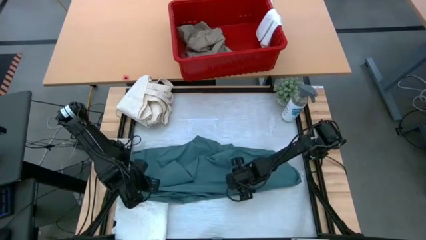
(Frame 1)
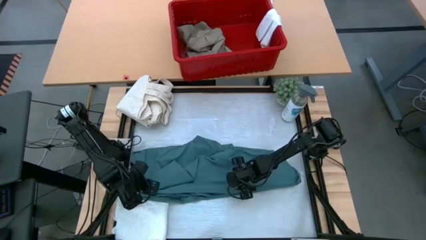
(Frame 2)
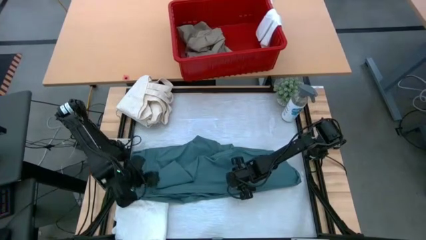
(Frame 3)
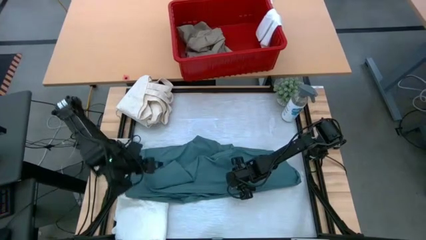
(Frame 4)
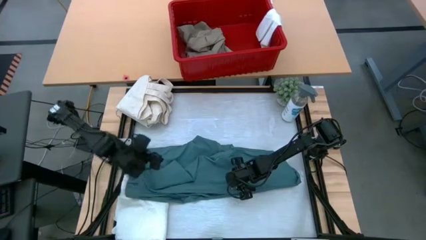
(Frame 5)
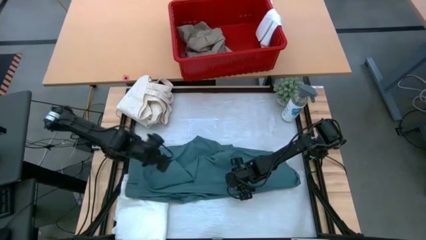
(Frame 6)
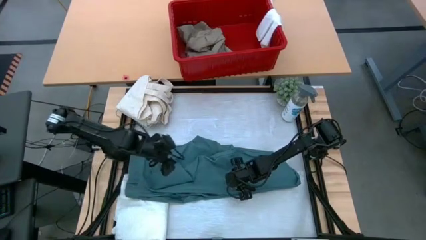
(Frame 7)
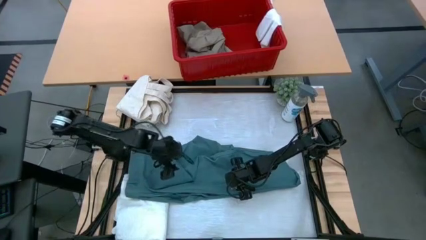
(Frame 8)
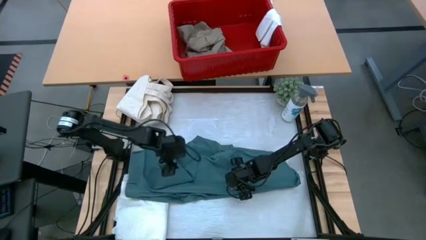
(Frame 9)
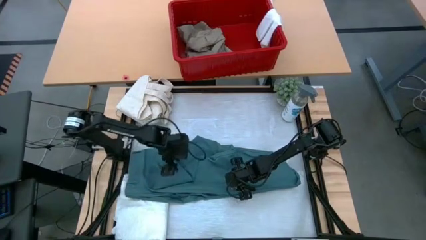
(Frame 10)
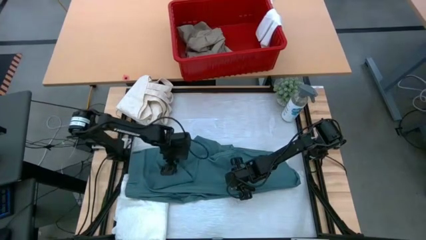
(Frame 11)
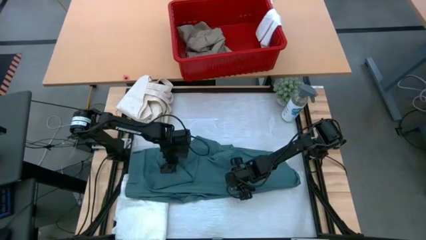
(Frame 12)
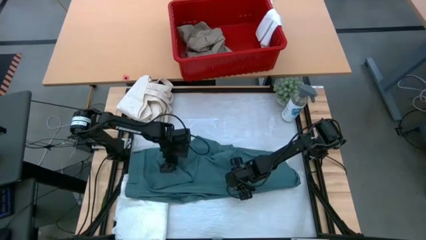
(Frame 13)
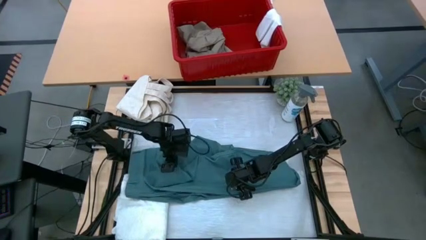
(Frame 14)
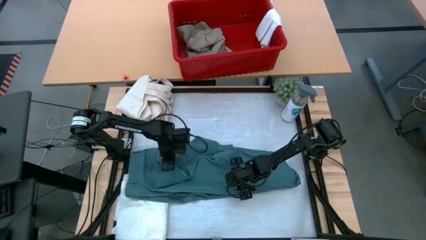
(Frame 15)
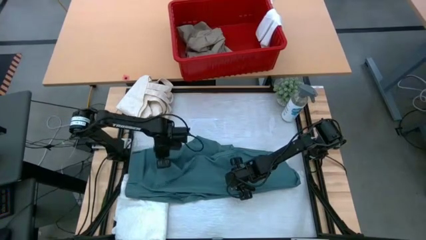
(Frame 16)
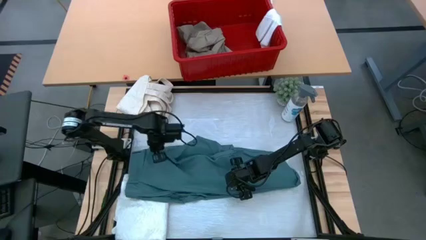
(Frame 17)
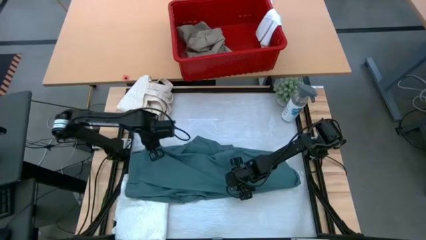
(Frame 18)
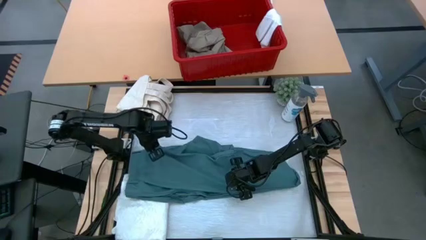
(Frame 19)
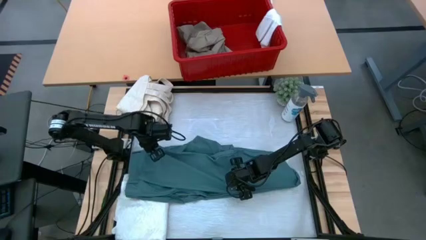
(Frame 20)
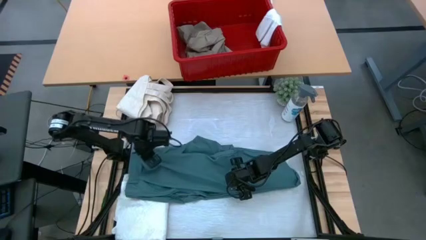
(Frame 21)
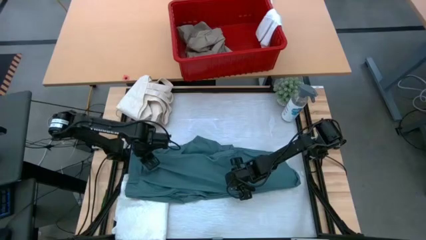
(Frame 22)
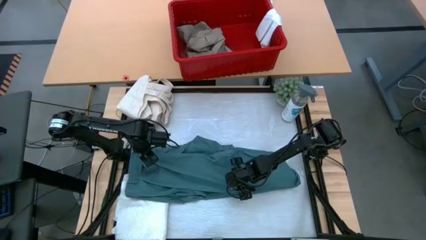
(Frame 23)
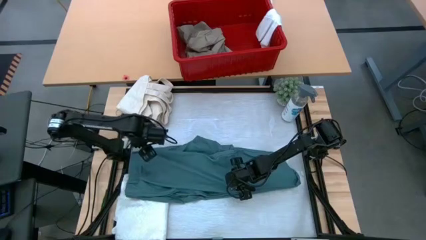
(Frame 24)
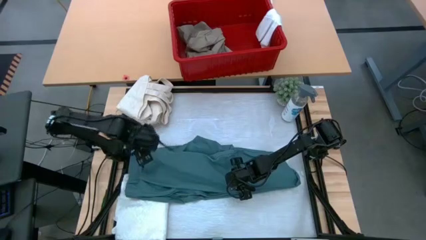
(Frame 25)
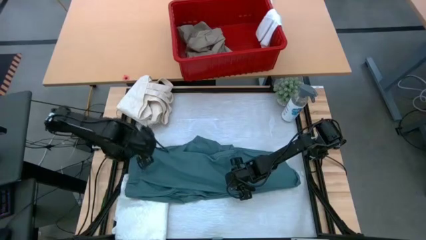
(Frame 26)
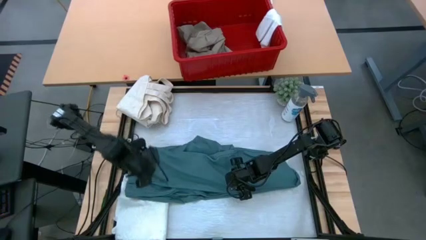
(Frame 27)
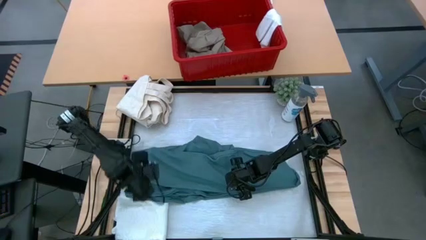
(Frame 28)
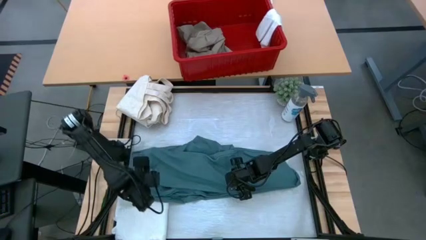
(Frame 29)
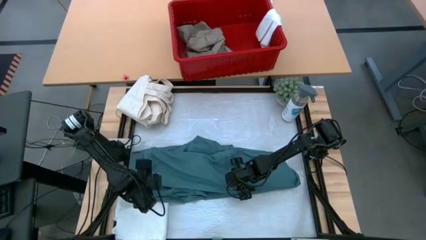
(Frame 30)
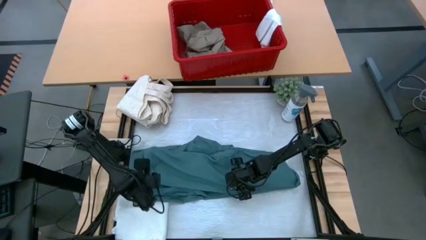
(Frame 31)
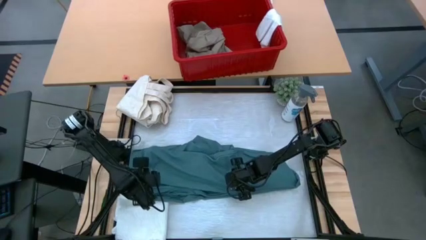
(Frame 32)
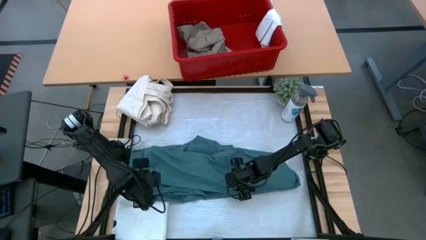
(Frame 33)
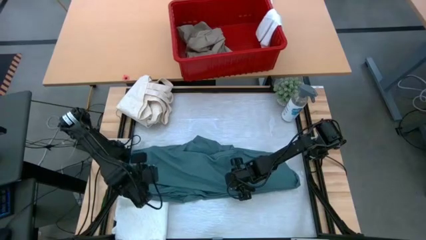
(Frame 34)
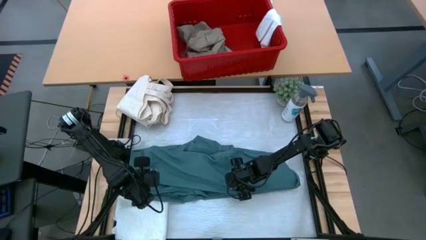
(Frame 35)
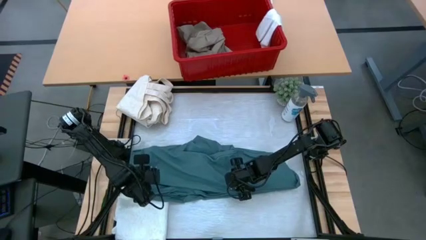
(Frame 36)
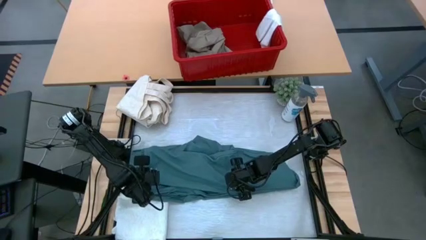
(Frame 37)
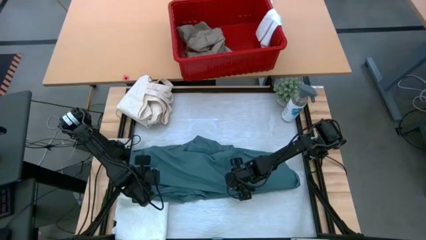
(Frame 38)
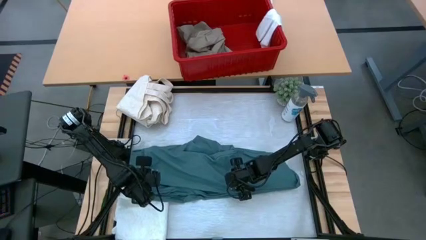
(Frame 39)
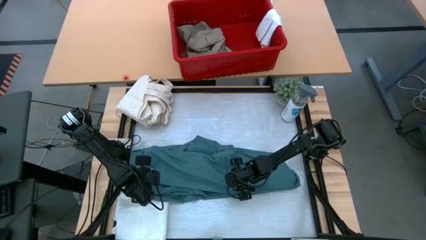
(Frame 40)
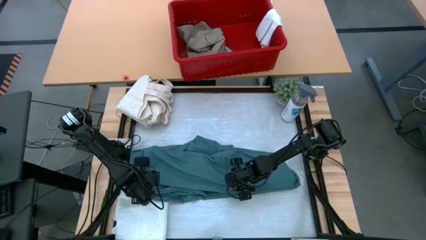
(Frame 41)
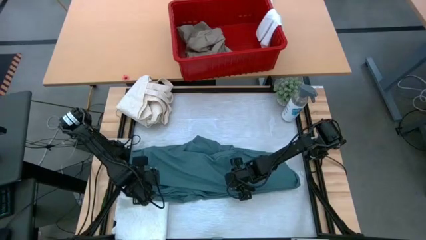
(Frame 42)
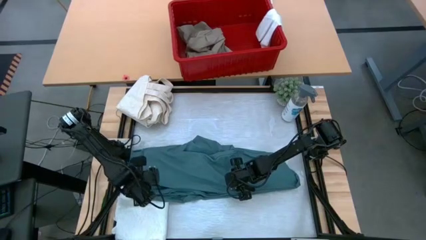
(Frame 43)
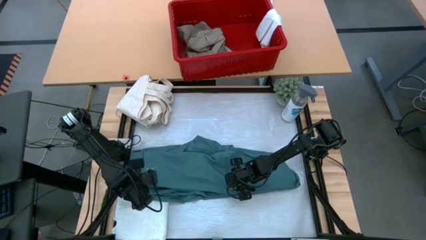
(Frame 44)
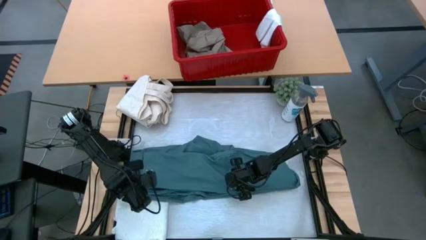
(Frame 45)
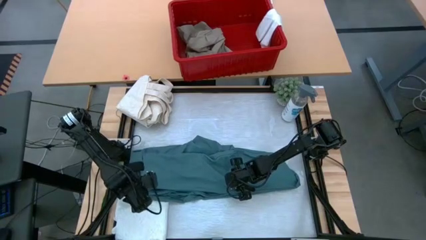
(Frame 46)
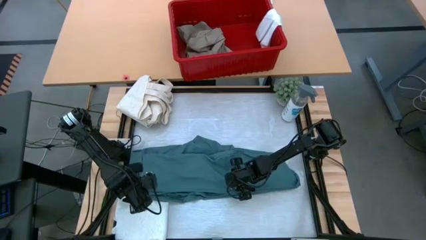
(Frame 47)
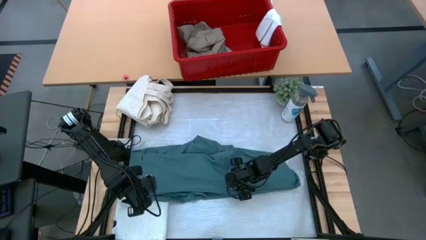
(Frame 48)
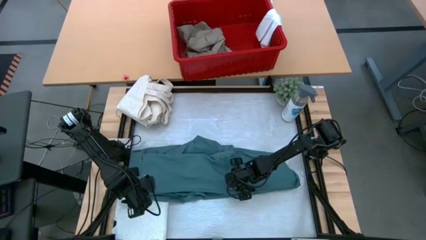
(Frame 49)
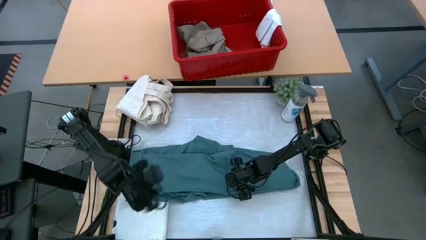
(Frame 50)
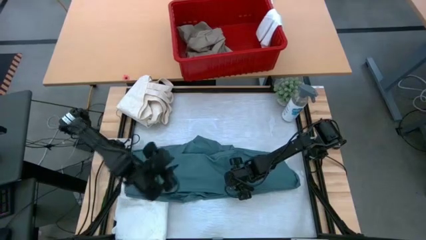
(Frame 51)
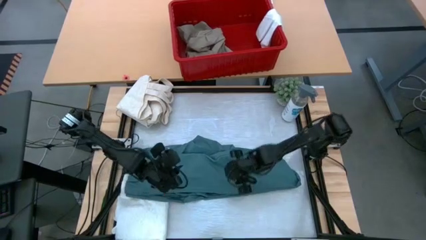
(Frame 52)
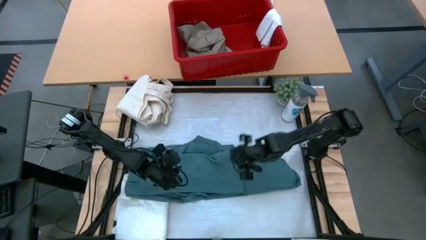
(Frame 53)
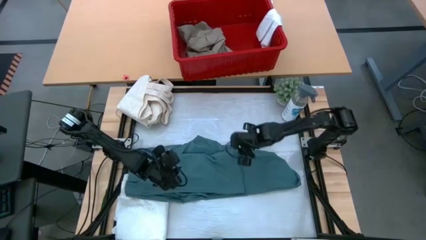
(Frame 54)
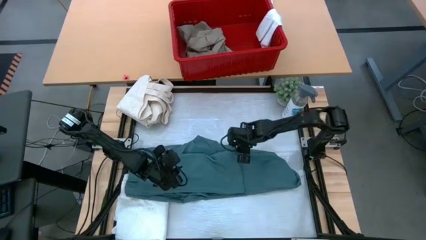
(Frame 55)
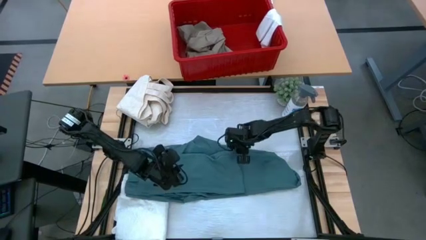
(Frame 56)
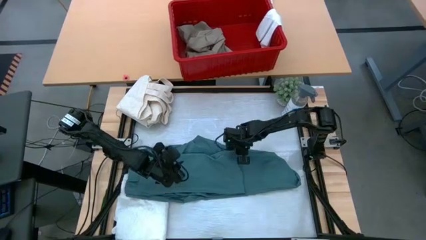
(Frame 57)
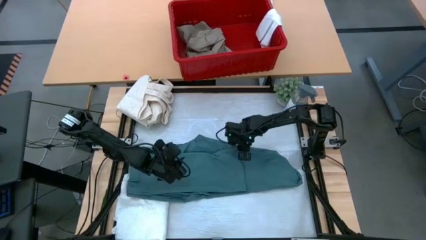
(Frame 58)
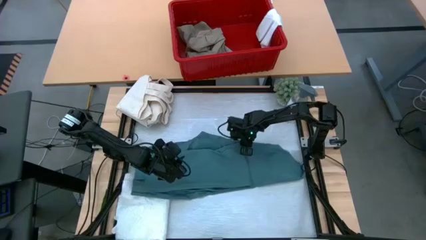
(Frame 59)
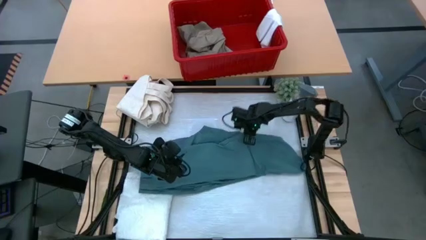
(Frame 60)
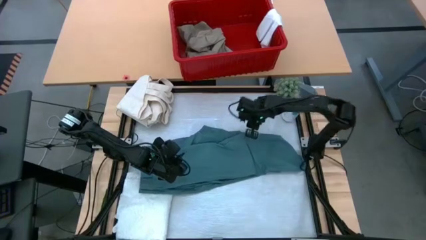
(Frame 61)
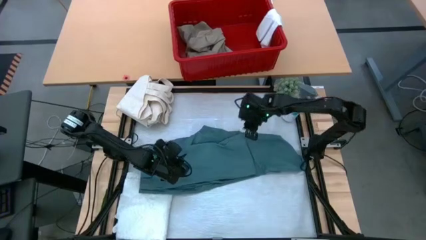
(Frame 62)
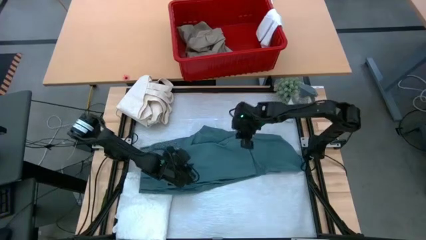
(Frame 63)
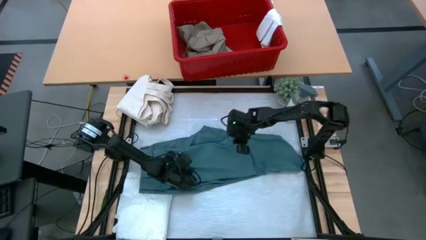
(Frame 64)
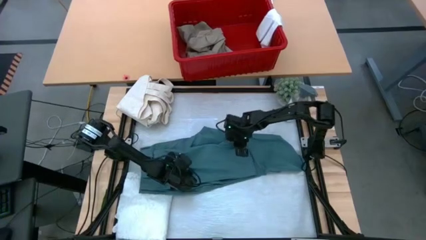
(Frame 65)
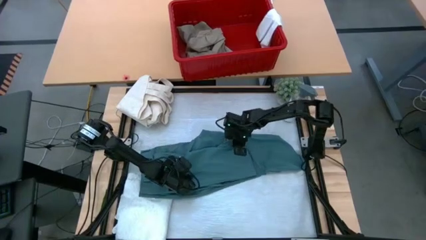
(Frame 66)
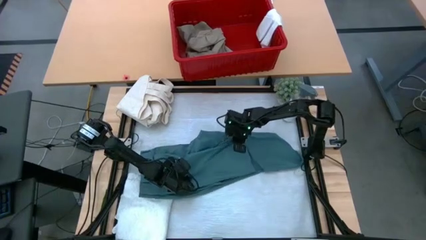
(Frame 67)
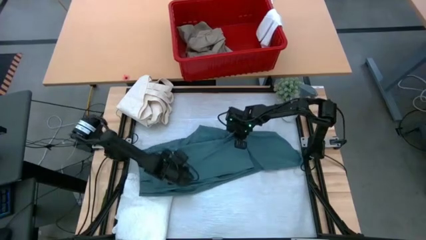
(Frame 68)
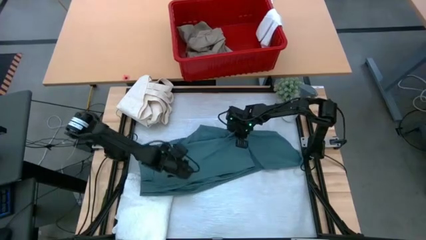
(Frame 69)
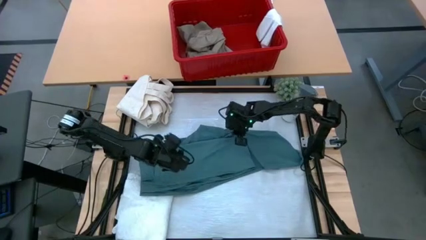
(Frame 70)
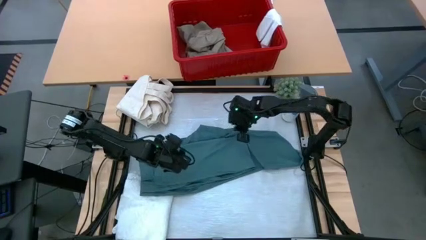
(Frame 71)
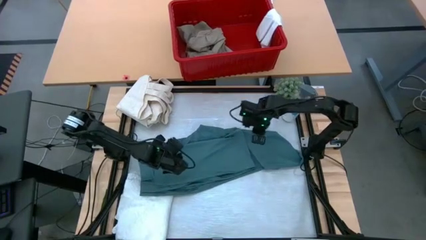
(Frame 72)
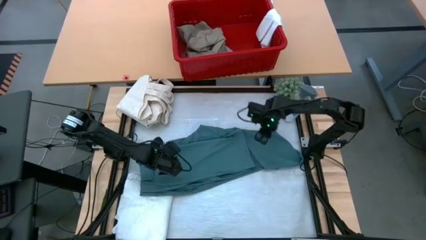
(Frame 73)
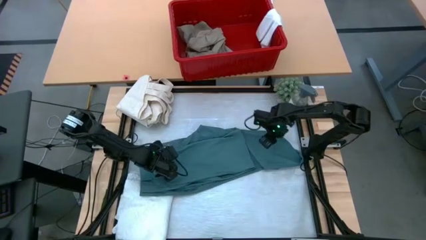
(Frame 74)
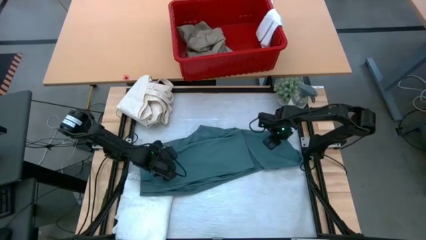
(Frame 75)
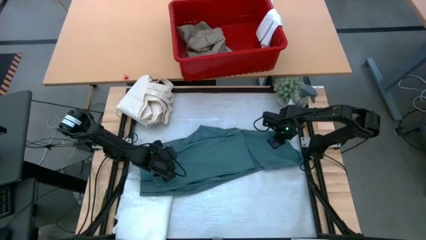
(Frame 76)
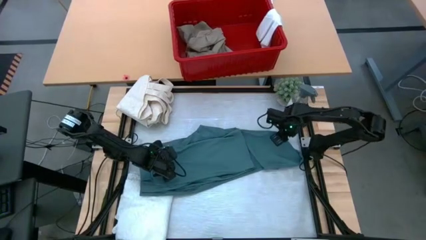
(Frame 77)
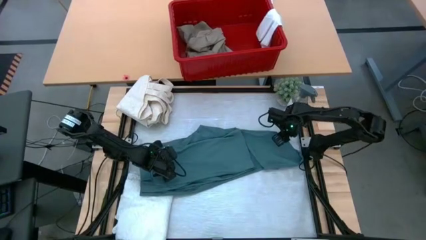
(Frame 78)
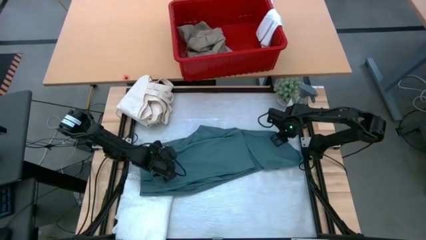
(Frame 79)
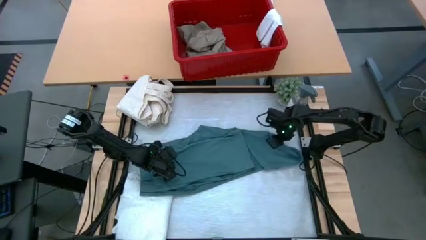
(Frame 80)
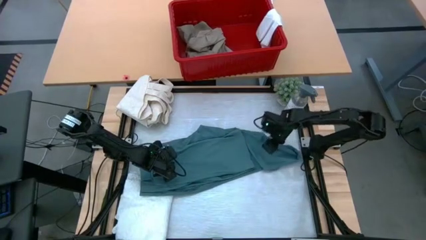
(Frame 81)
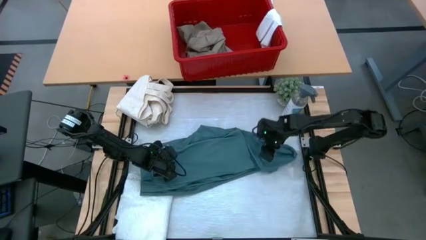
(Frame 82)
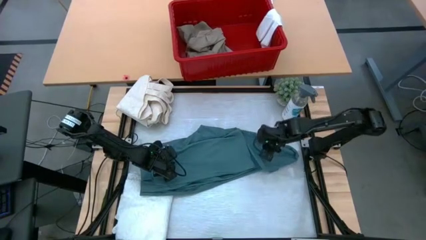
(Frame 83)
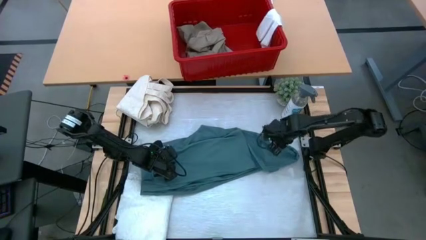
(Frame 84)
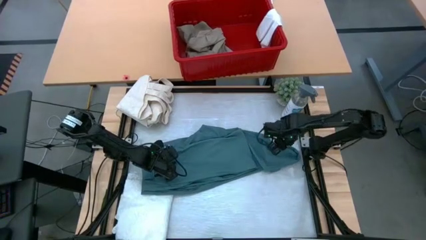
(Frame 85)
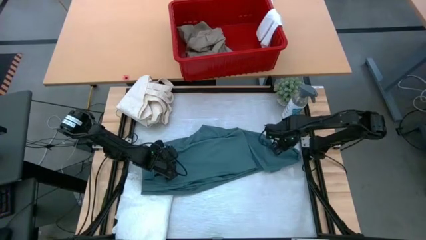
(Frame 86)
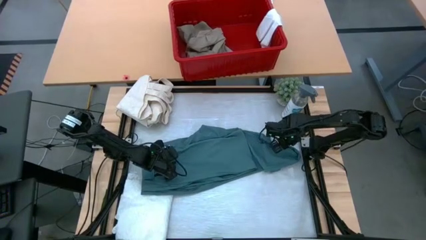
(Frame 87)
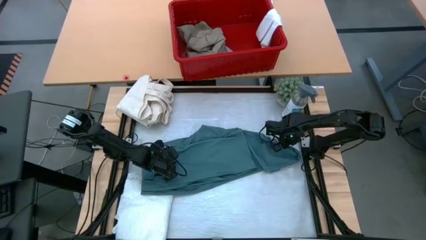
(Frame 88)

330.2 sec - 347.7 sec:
Task: Fold Laundry from Bin
Fold the blue pants
